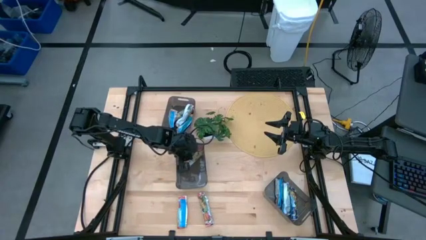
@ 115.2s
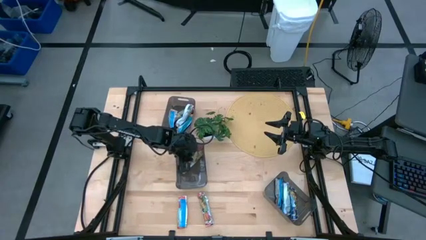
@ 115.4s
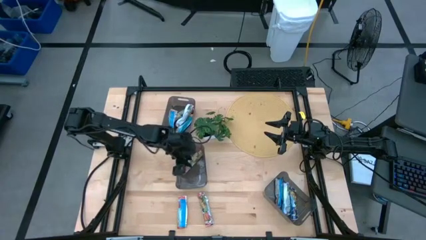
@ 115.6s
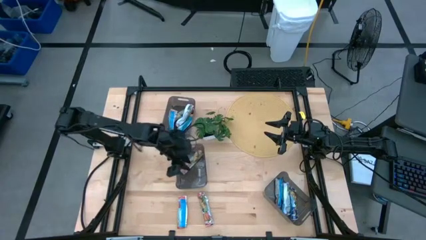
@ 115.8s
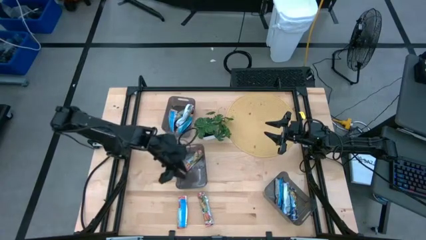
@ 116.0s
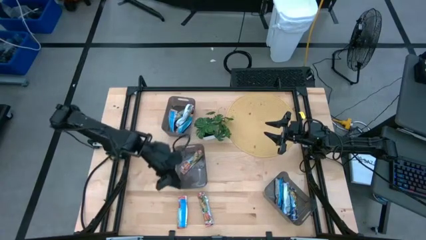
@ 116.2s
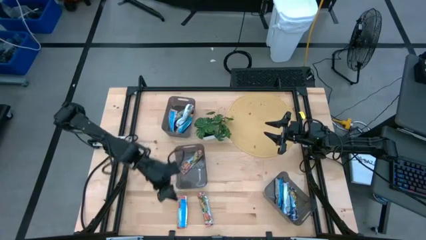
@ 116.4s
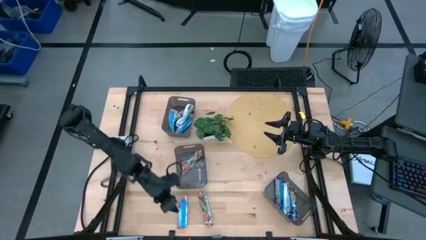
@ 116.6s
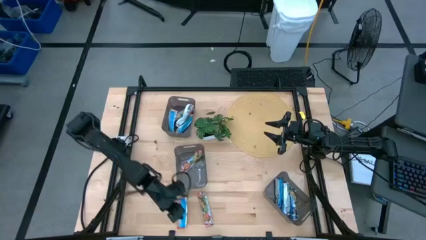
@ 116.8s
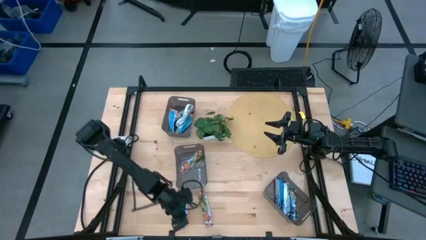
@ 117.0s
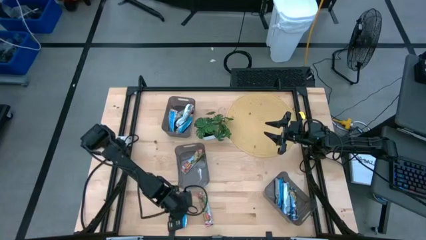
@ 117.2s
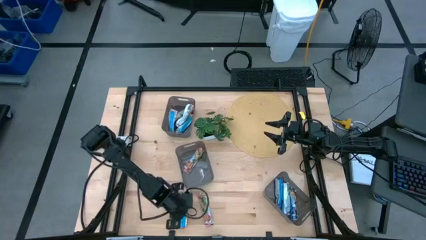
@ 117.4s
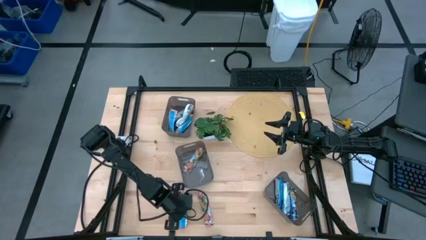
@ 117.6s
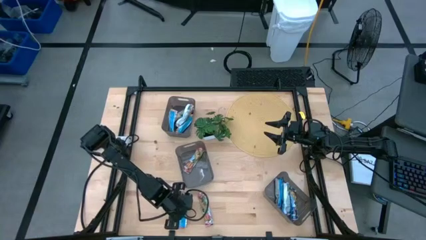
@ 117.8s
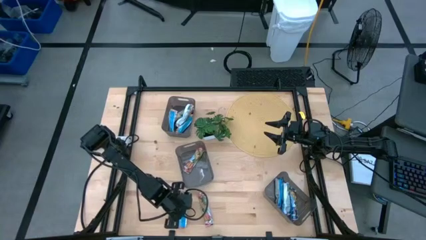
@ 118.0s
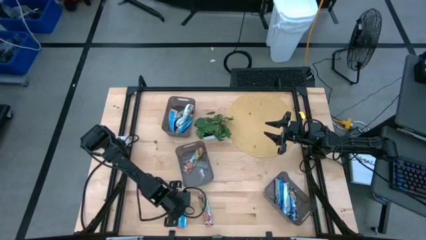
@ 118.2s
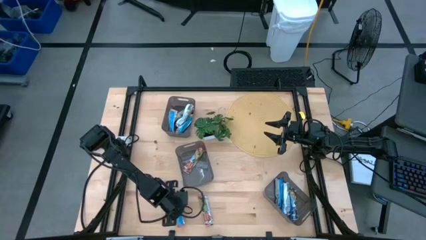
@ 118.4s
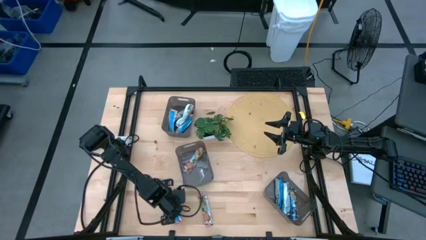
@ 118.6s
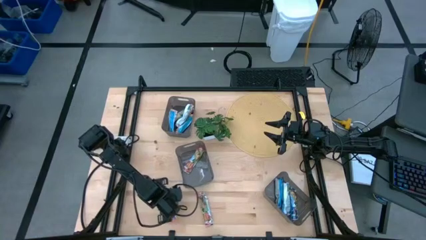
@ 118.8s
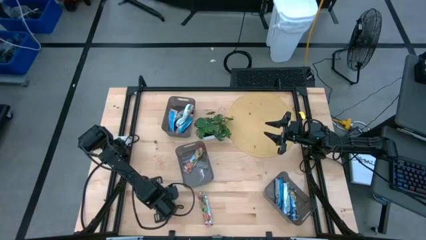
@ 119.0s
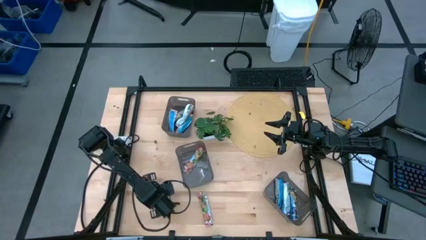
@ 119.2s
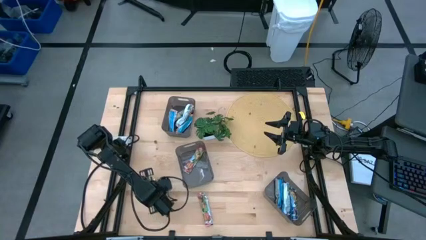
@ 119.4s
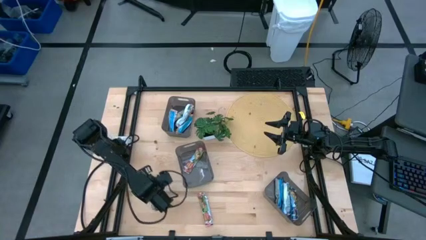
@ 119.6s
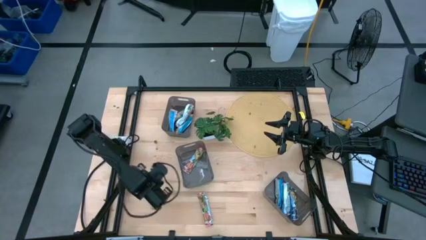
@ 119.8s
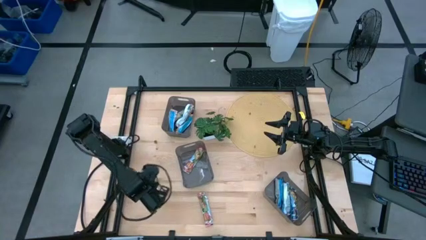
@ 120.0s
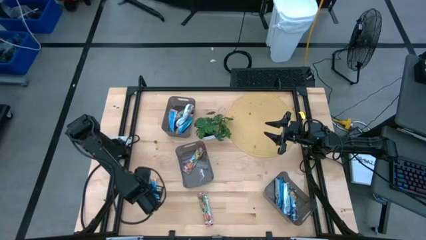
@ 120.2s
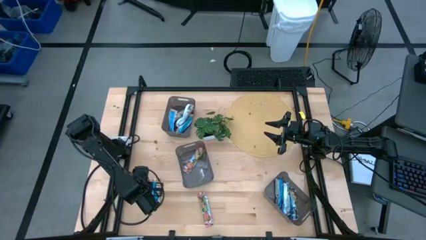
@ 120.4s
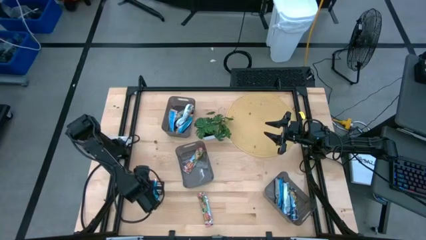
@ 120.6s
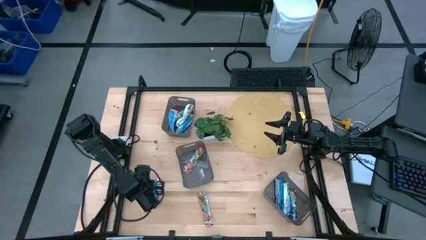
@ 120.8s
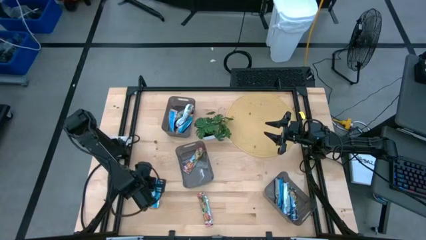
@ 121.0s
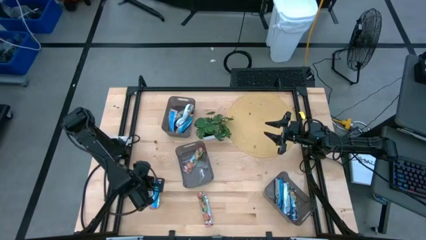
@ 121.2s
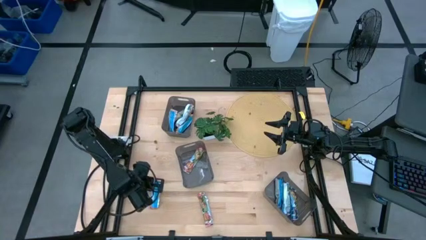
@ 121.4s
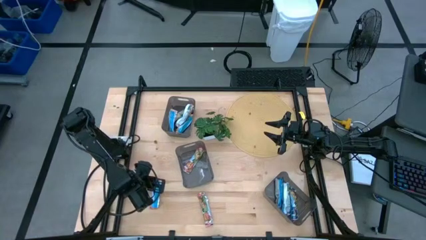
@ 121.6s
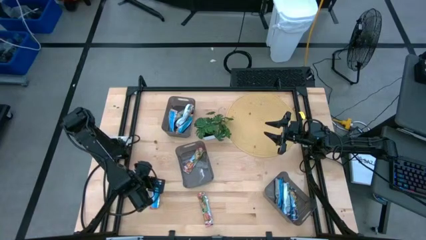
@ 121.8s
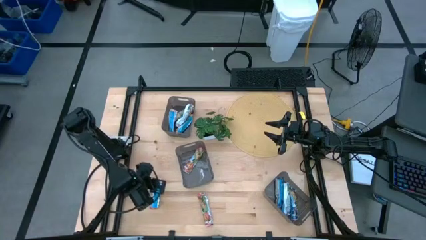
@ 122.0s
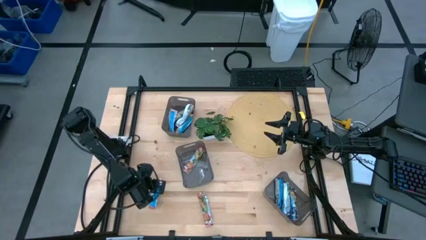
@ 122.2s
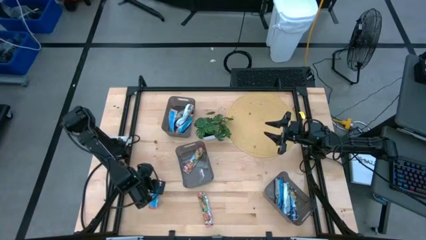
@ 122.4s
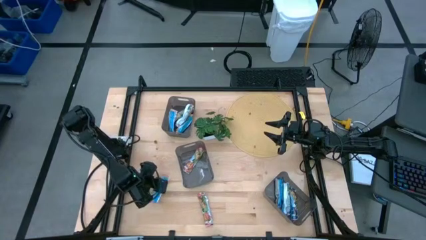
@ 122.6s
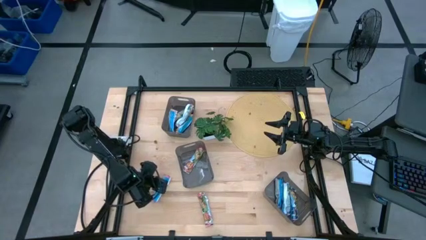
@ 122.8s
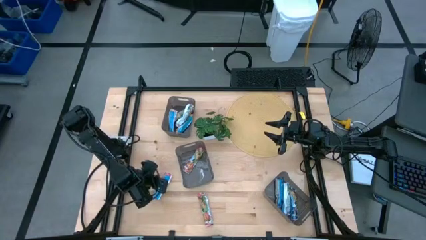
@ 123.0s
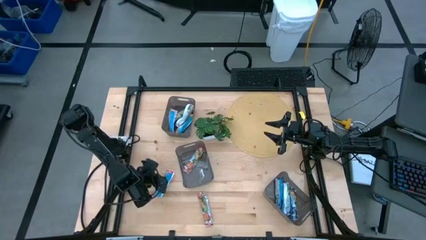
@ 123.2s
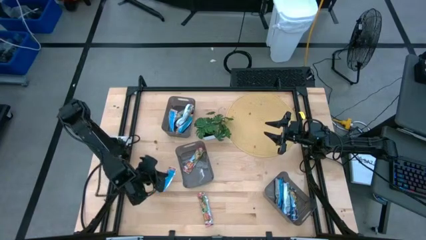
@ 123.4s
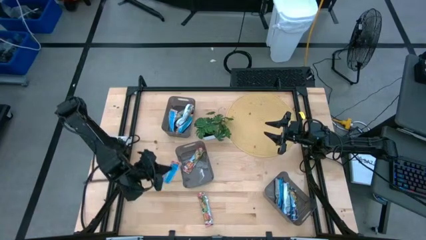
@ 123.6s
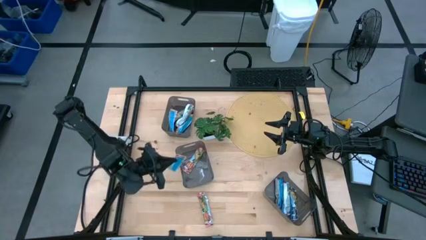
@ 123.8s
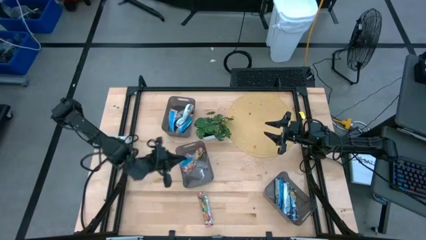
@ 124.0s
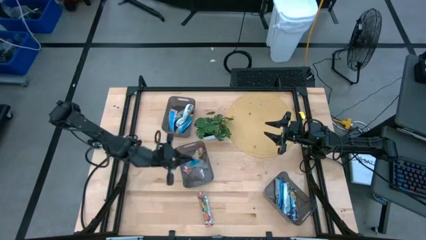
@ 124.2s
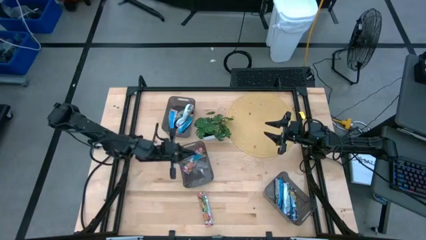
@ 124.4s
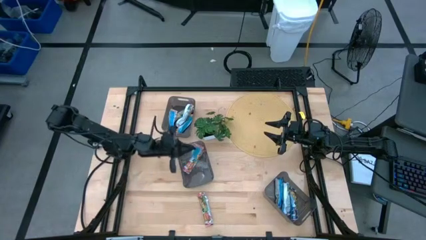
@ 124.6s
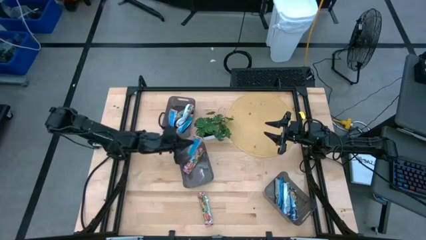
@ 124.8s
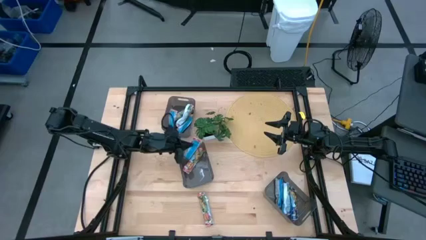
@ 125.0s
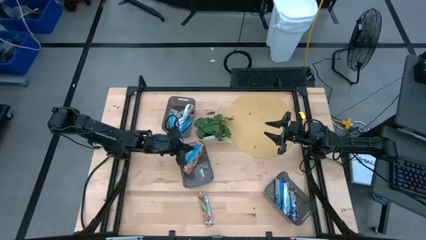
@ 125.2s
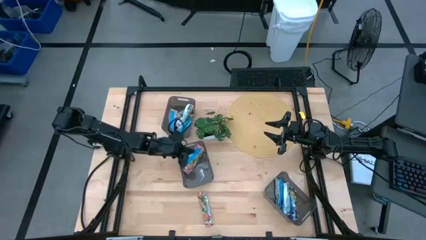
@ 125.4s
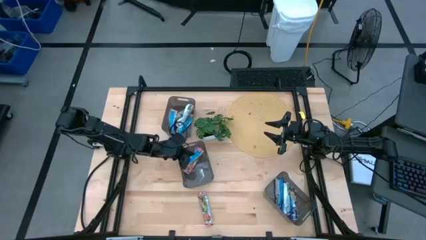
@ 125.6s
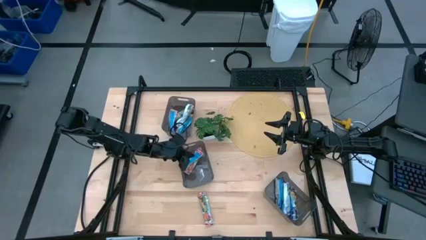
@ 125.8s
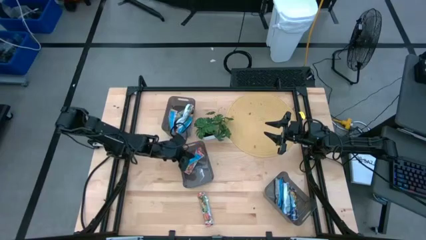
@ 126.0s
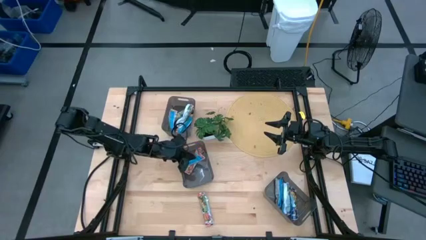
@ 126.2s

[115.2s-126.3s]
Task: Pick and place Granola Bars by type
Put the left red granola bar into the bottom left black bin

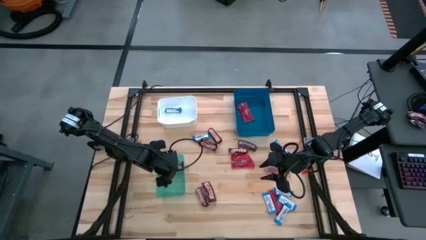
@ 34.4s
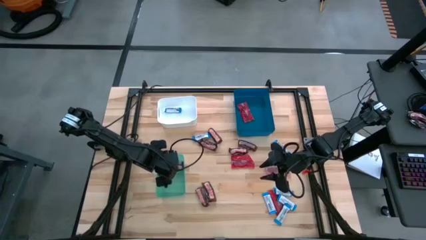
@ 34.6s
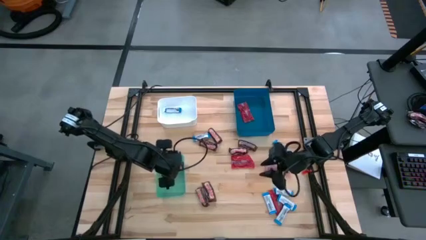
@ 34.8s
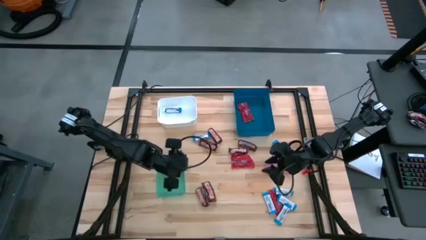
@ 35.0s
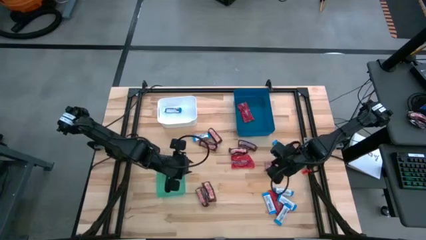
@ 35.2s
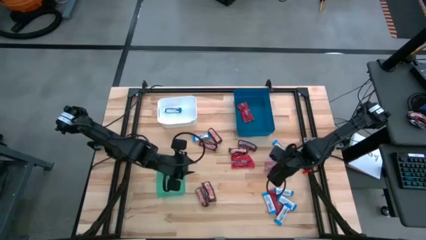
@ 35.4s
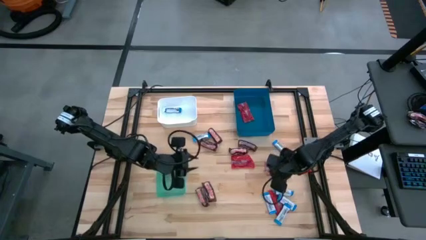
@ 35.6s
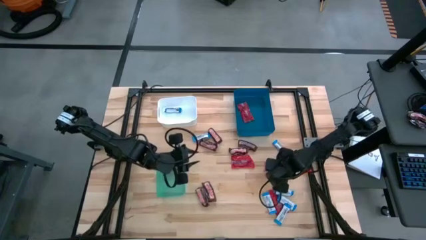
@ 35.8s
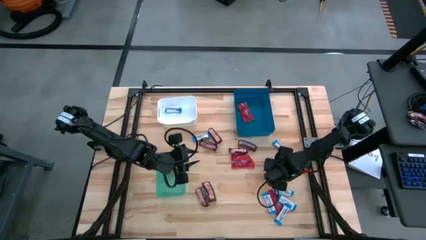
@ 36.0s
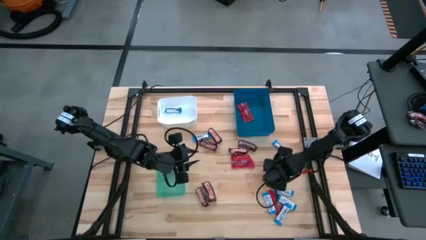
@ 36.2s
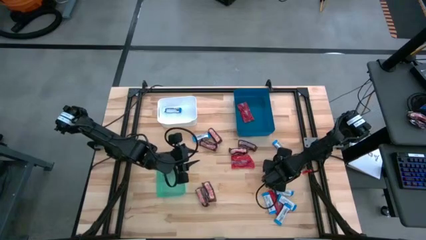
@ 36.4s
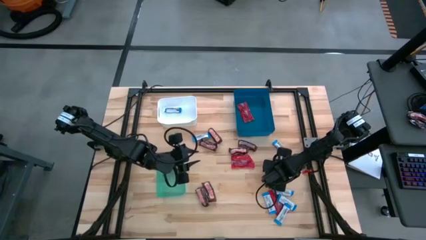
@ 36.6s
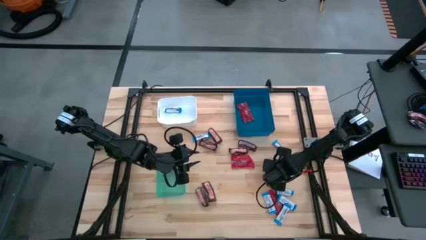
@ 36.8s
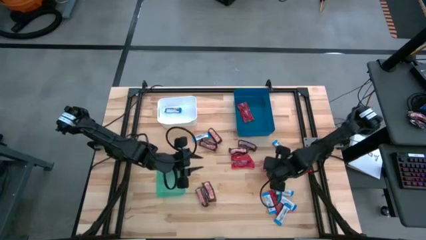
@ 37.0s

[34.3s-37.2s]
Task: Sort candy
Put the red candy into the blue bin
